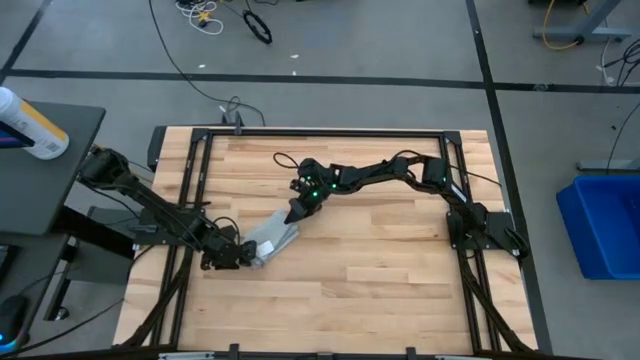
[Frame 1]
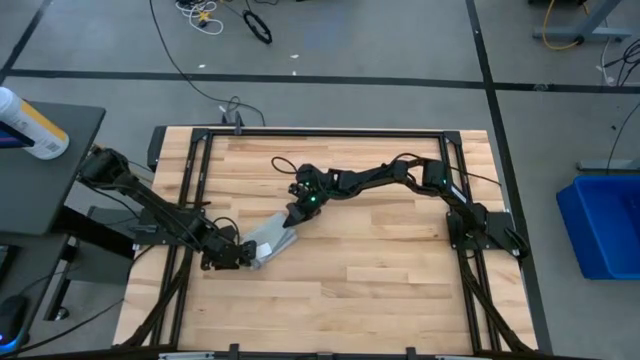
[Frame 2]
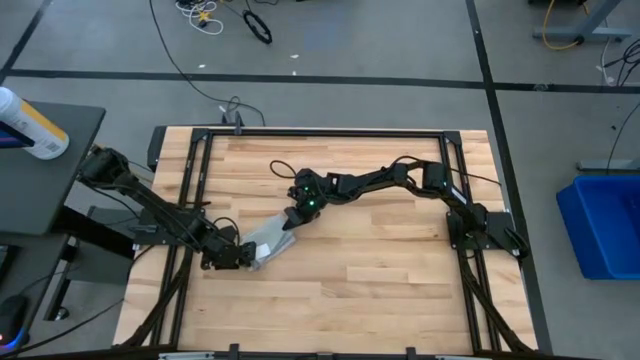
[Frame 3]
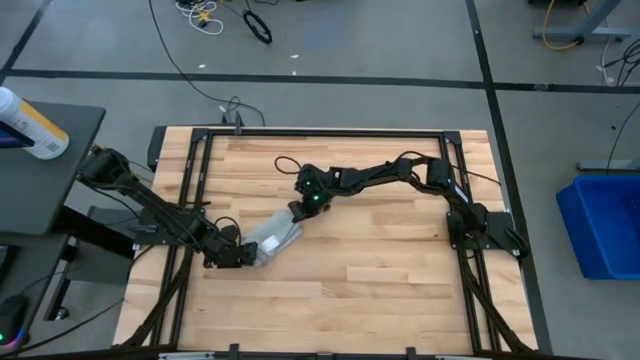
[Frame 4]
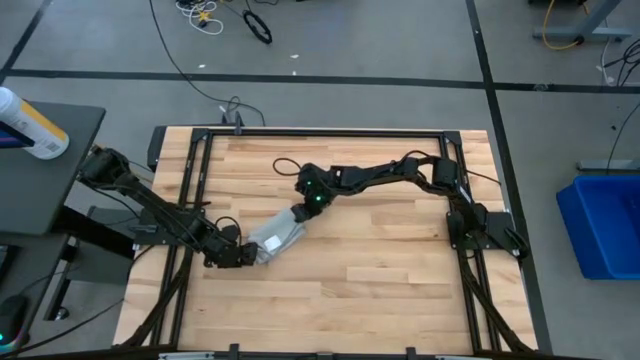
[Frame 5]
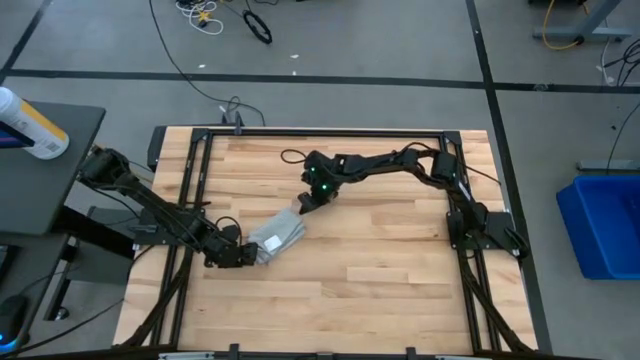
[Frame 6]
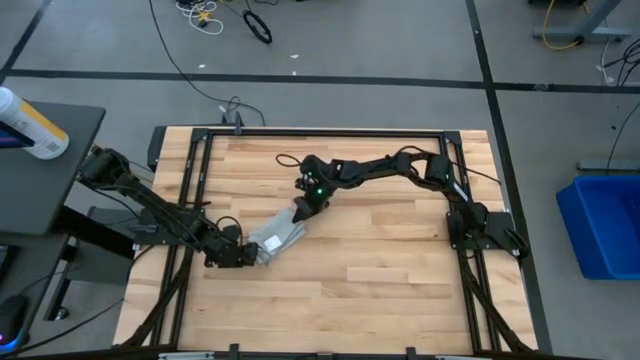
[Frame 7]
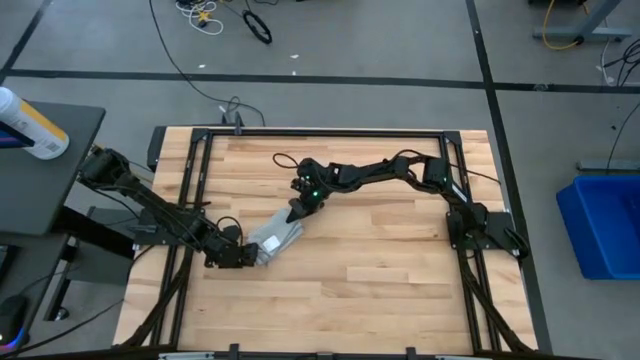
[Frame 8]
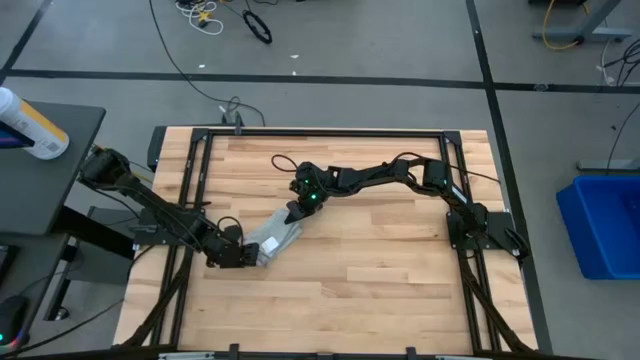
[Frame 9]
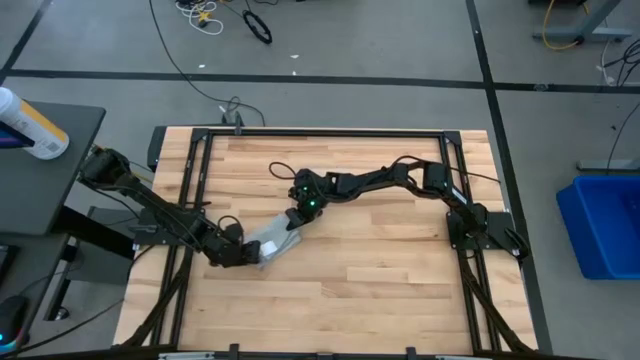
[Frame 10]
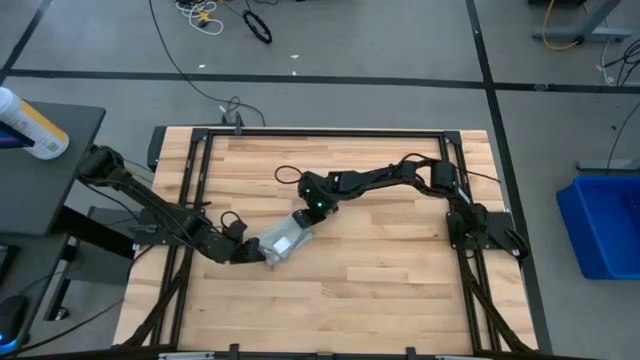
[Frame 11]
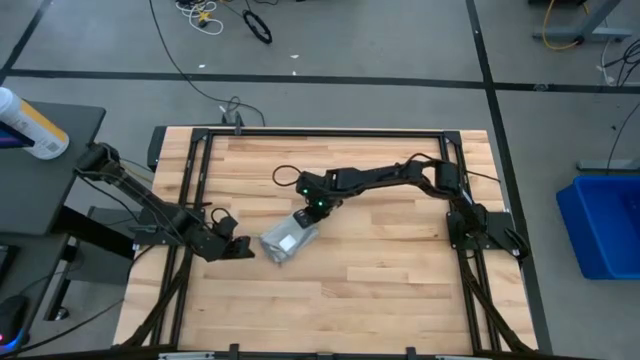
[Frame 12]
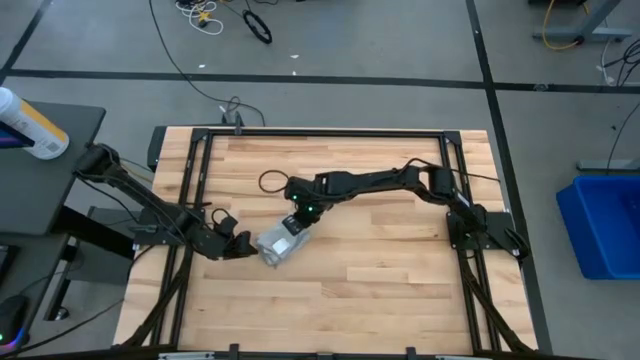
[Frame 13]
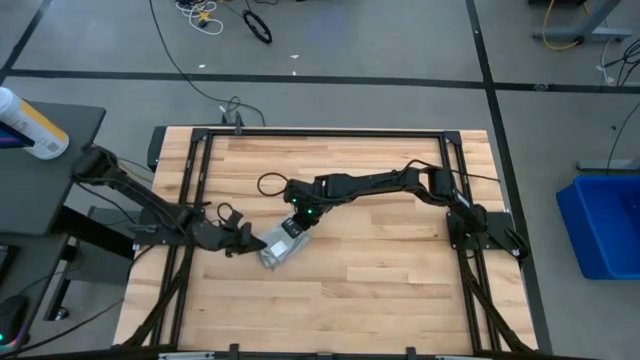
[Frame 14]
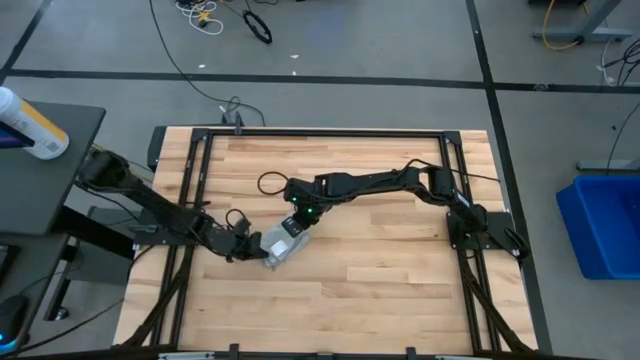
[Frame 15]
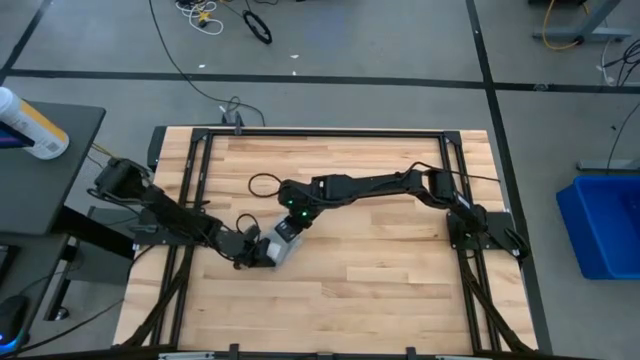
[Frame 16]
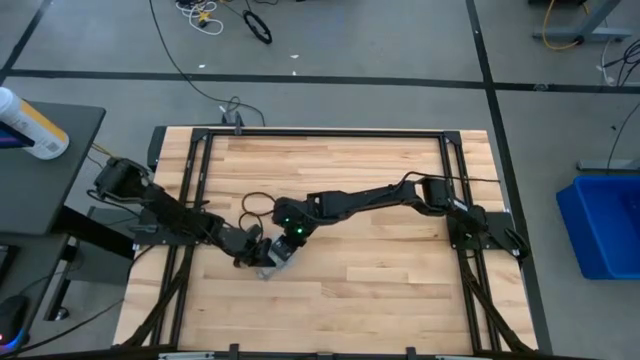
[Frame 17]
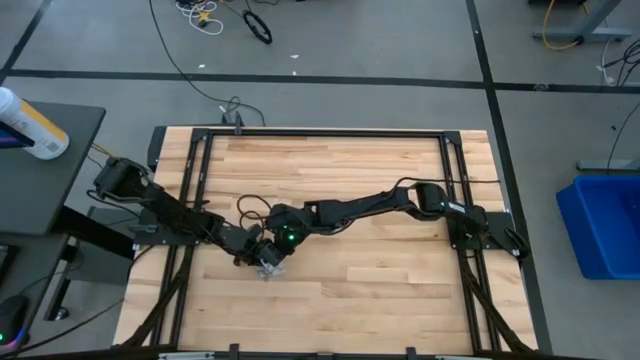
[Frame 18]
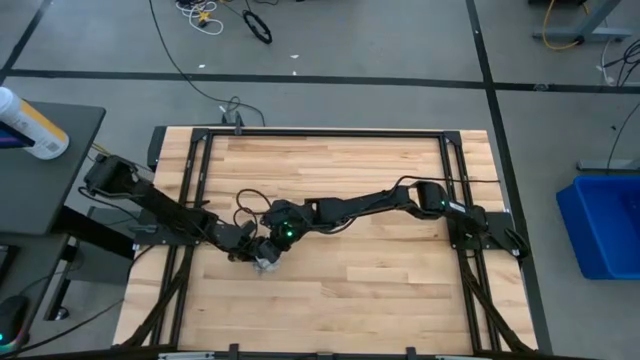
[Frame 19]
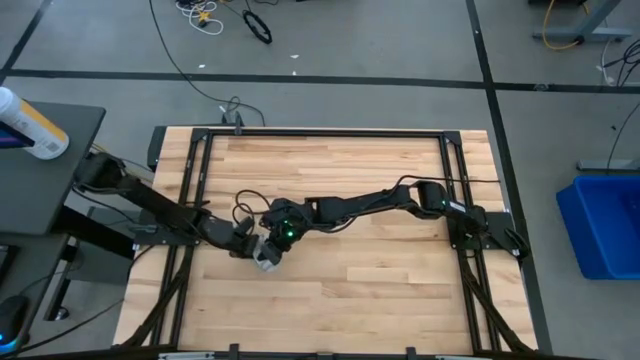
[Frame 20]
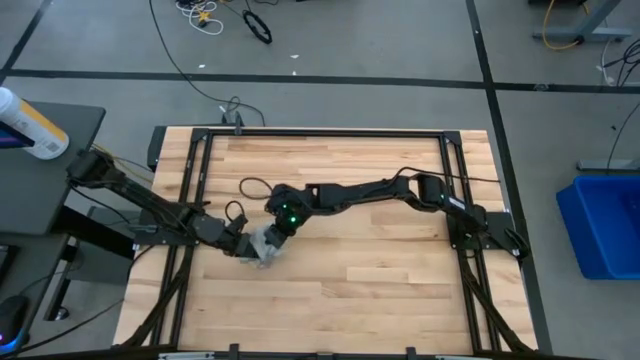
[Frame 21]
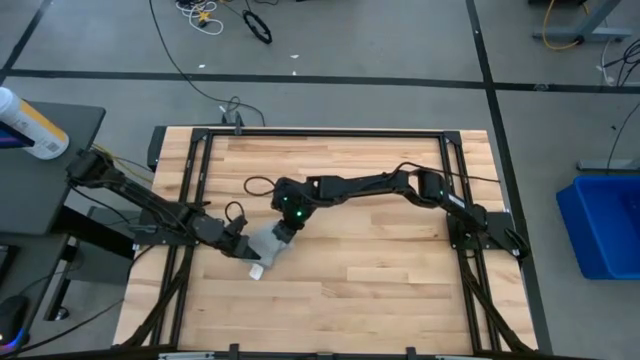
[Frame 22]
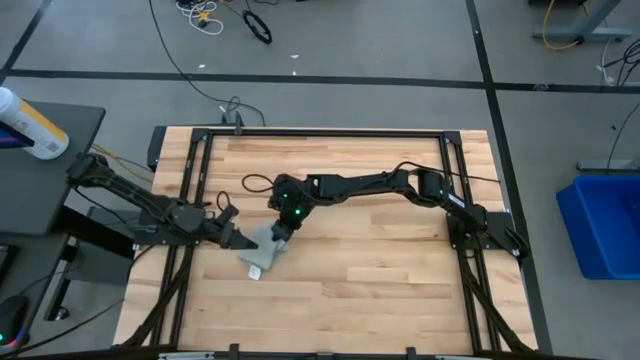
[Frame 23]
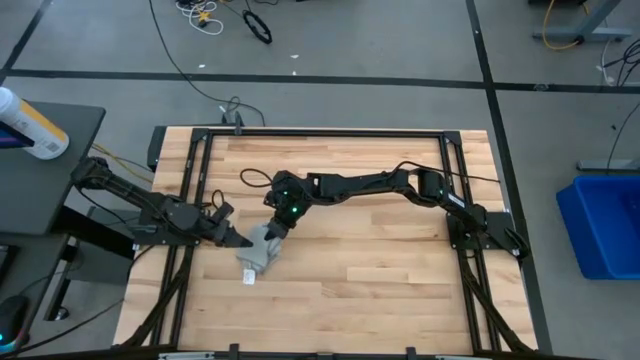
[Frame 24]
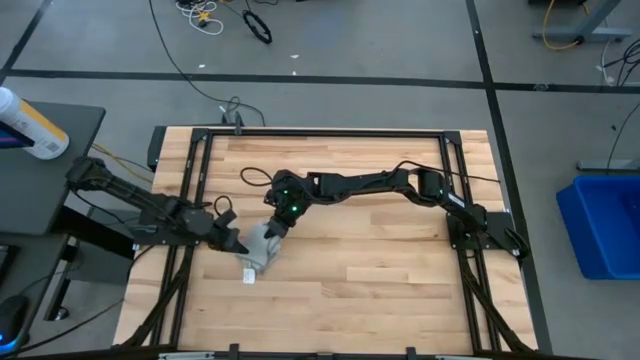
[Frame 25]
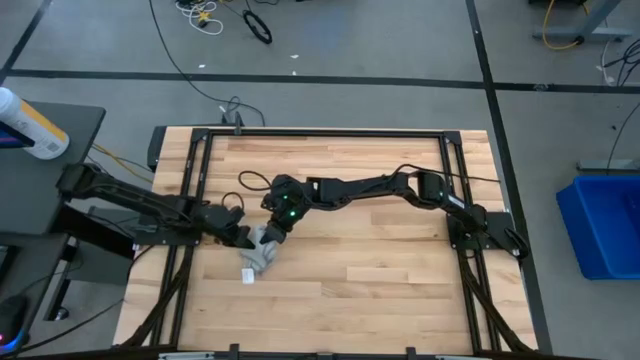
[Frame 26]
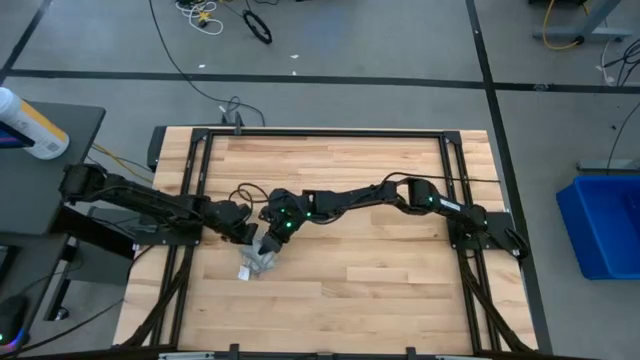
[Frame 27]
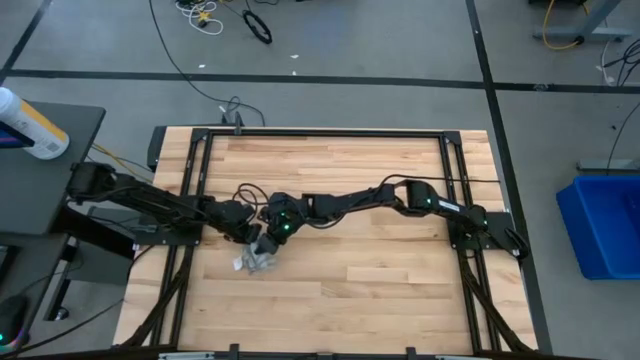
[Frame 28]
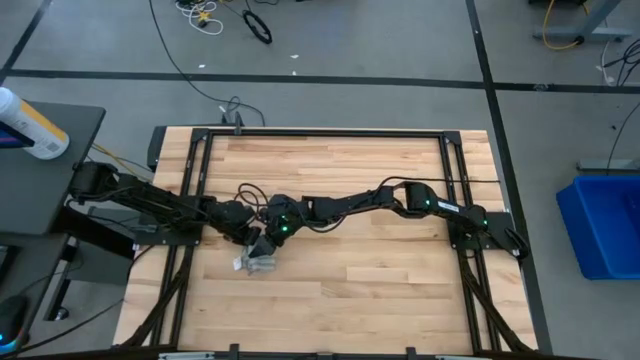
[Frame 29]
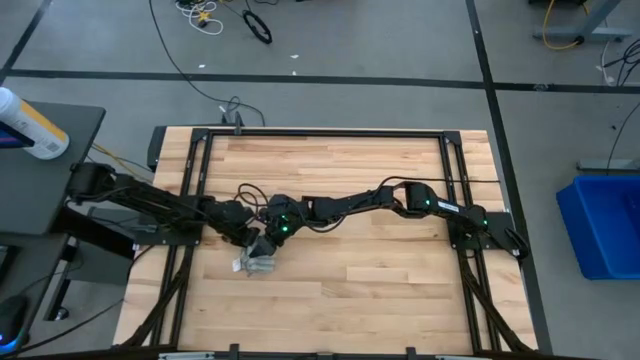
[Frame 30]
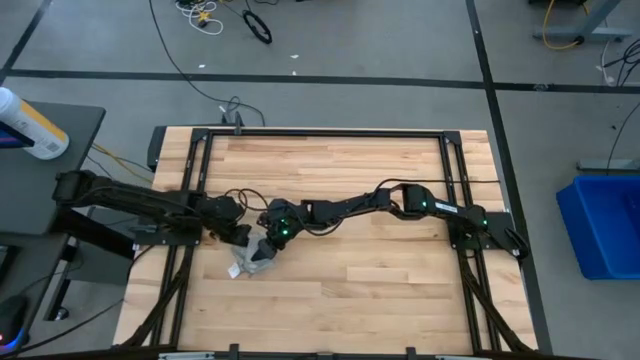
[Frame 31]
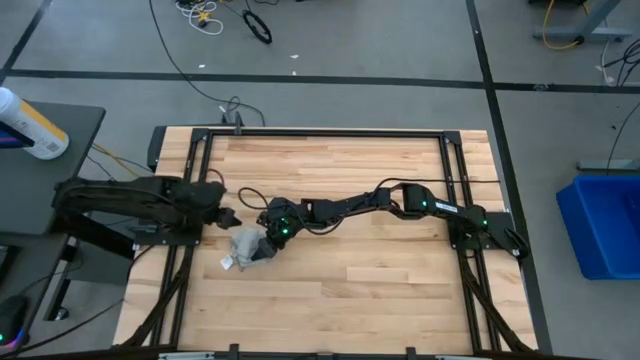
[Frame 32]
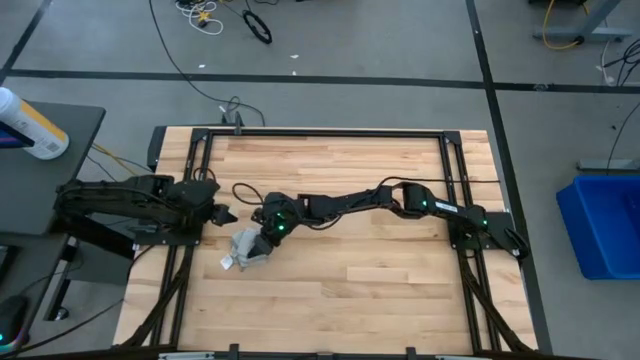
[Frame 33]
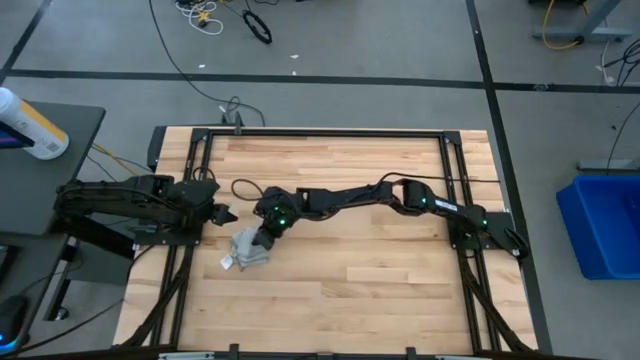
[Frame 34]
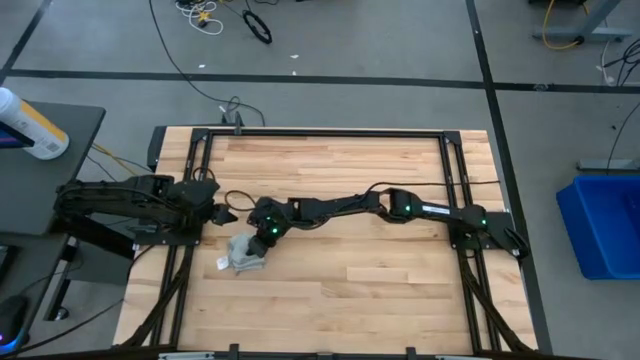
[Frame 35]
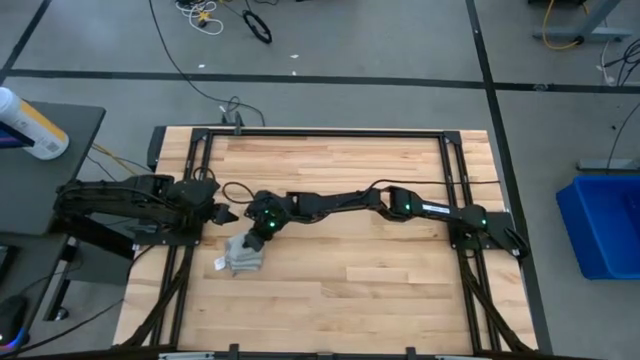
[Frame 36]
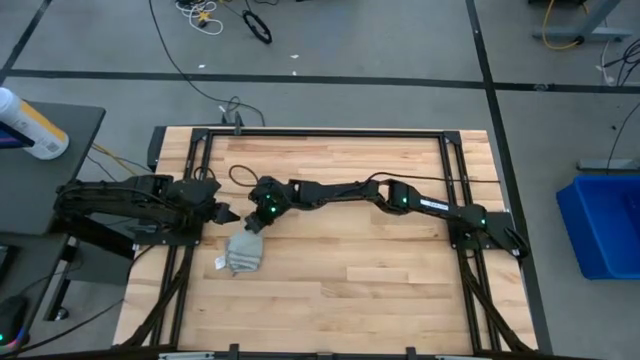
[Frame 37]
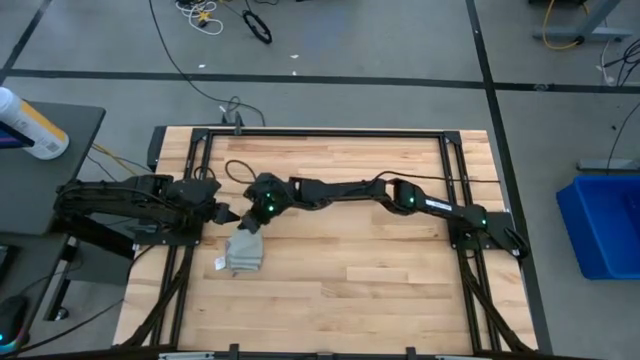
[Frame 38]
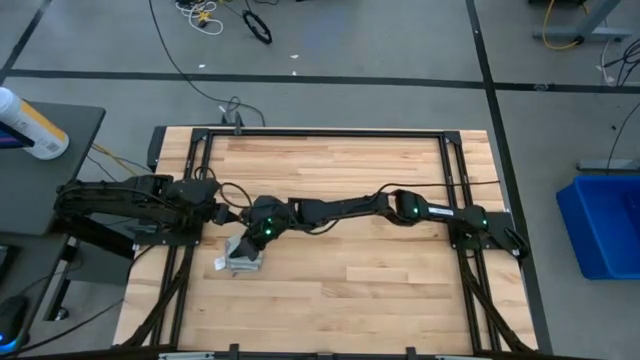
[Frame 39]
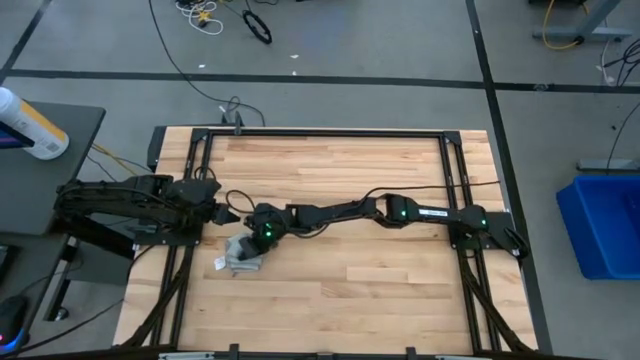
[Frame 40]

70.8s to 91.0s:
Task: Fold microfiber towels
Fold the grey towel
